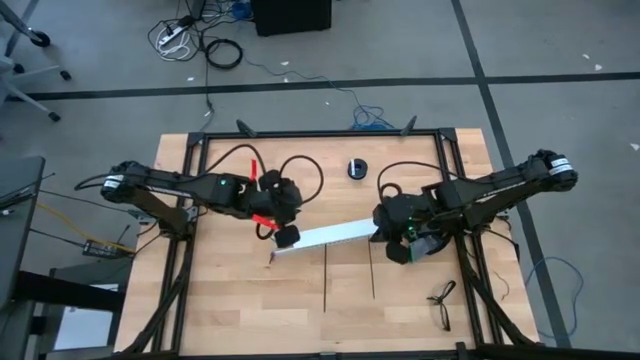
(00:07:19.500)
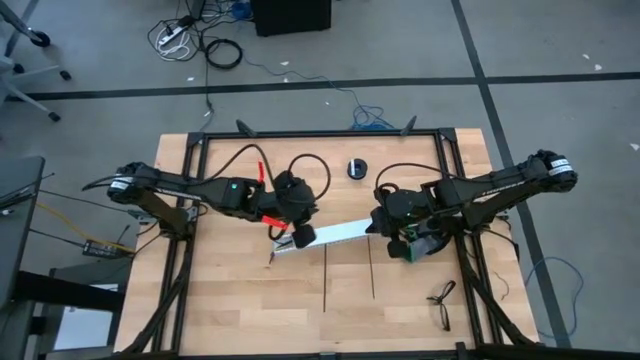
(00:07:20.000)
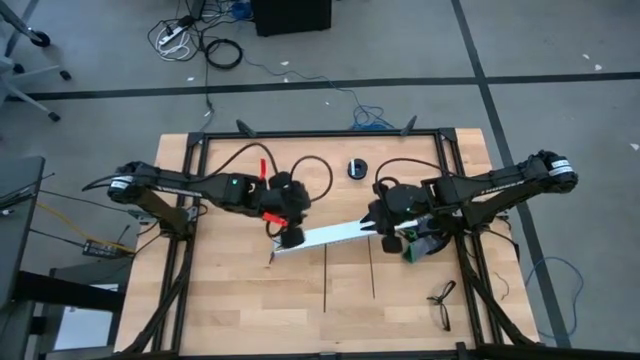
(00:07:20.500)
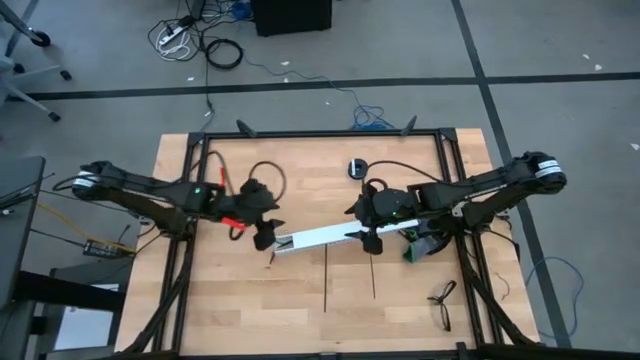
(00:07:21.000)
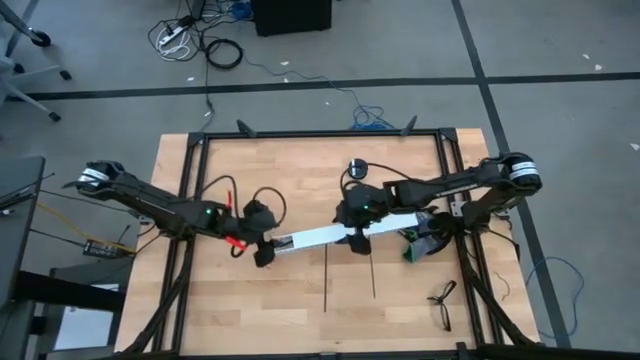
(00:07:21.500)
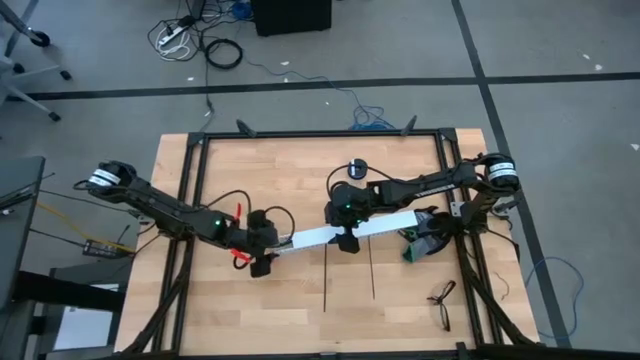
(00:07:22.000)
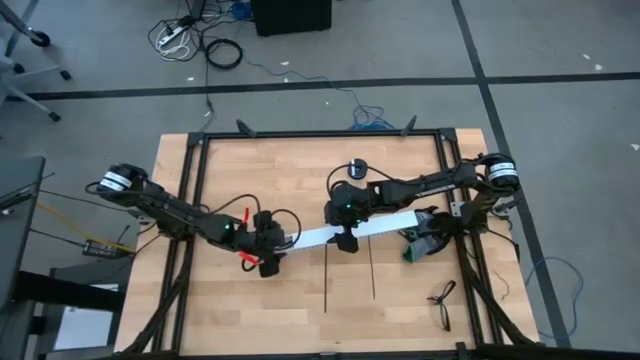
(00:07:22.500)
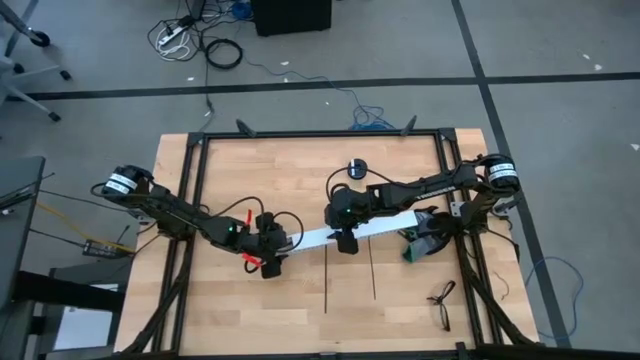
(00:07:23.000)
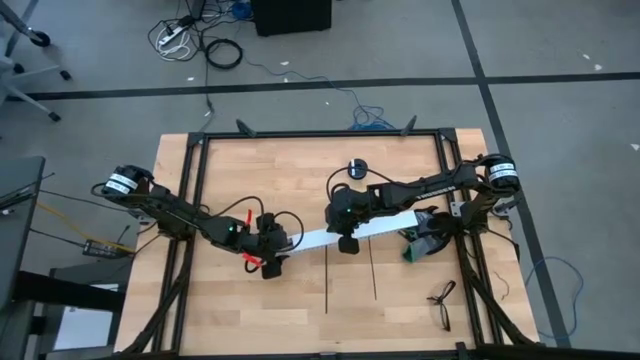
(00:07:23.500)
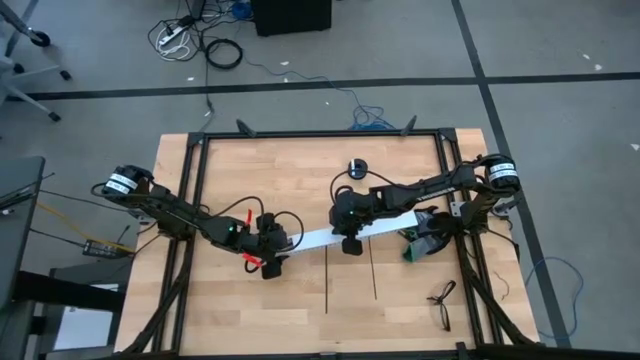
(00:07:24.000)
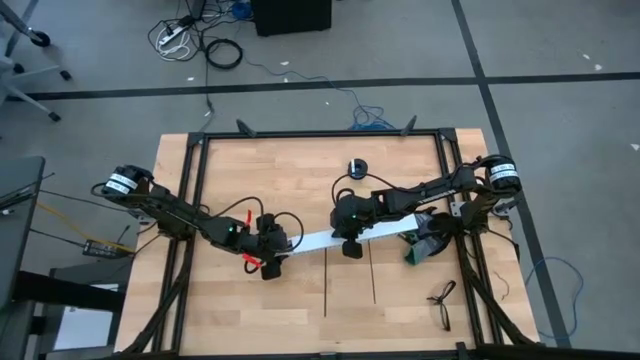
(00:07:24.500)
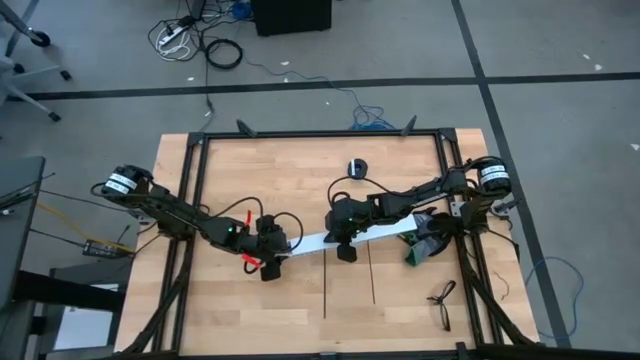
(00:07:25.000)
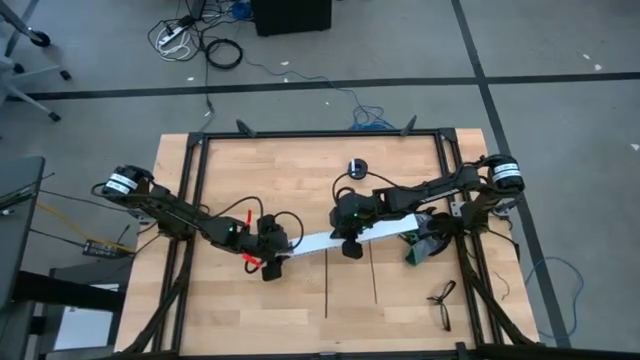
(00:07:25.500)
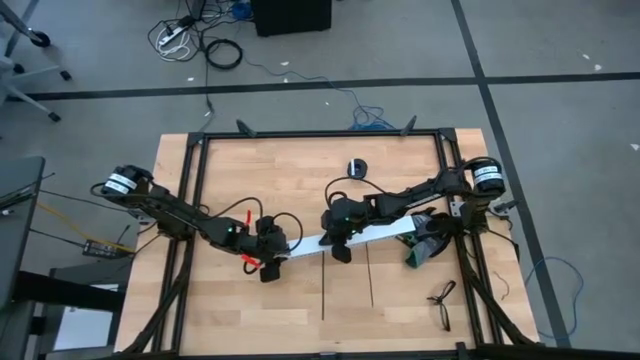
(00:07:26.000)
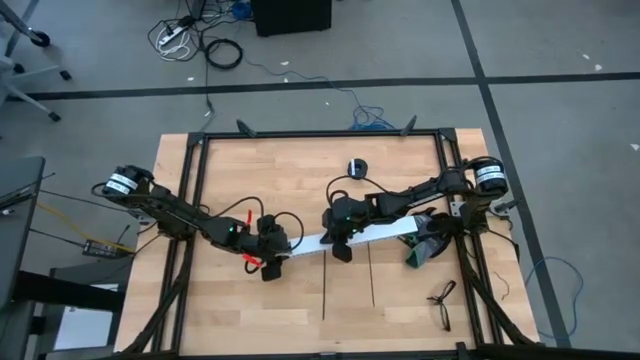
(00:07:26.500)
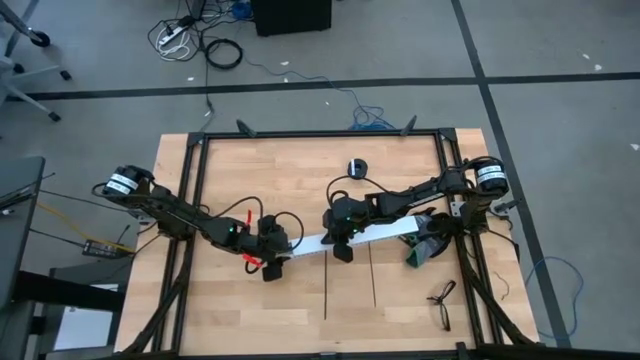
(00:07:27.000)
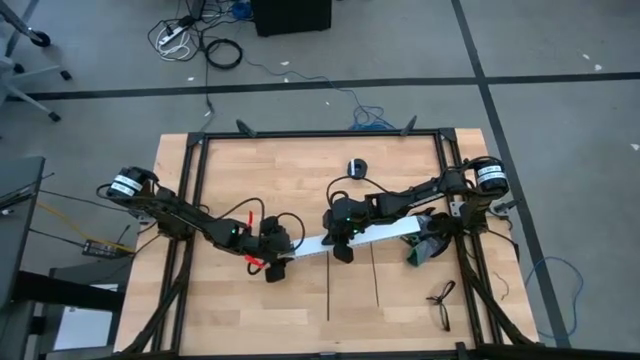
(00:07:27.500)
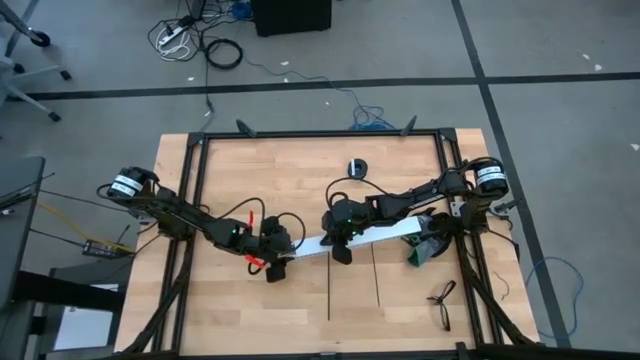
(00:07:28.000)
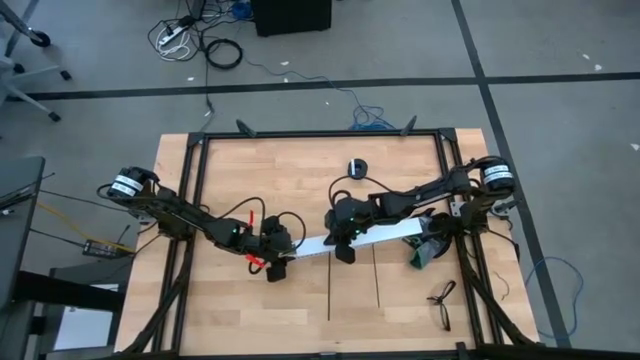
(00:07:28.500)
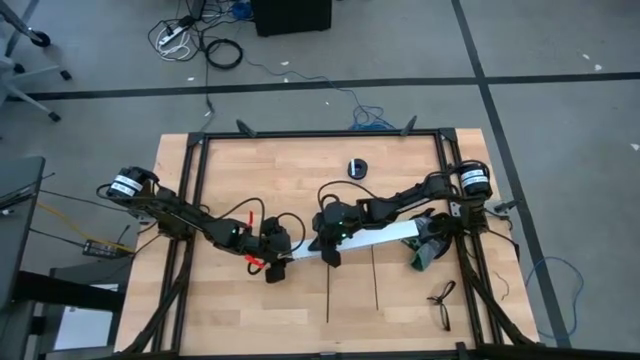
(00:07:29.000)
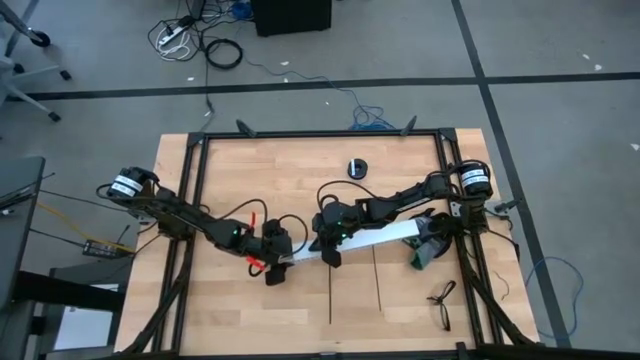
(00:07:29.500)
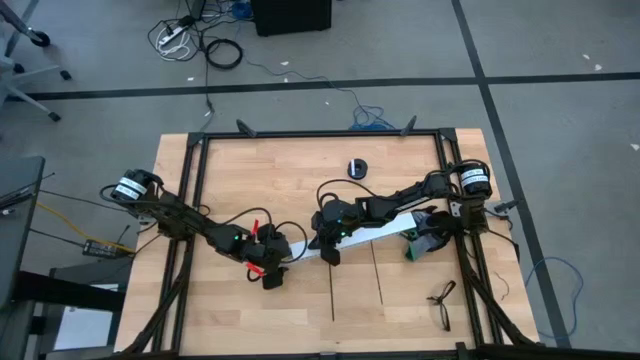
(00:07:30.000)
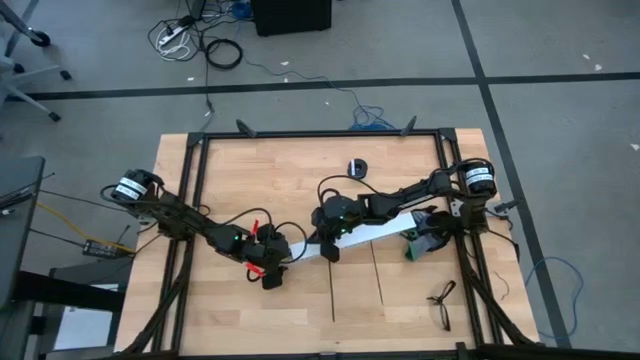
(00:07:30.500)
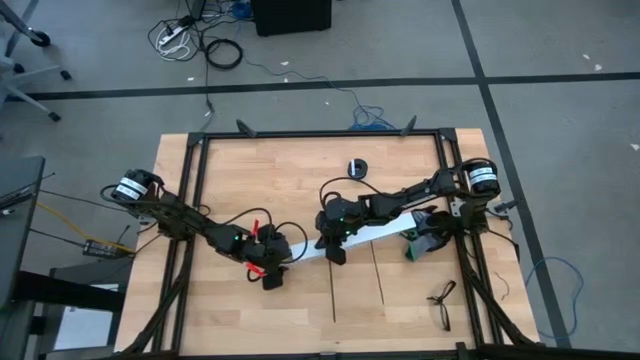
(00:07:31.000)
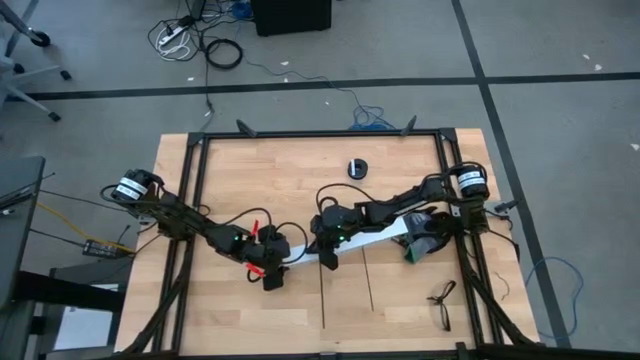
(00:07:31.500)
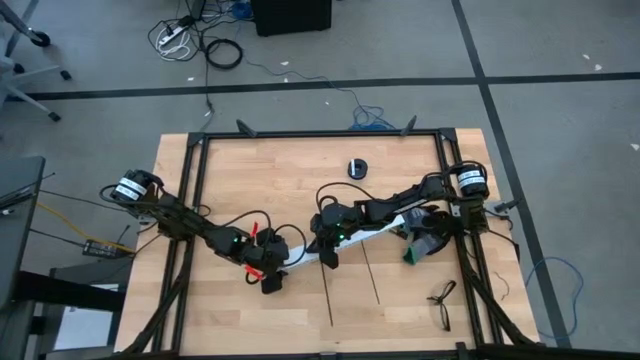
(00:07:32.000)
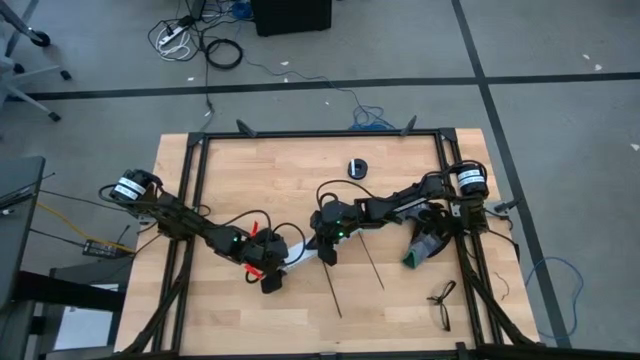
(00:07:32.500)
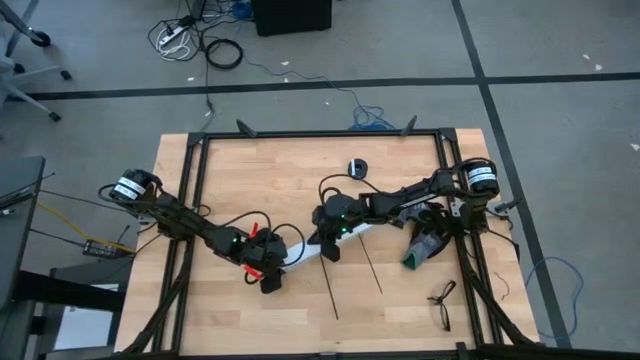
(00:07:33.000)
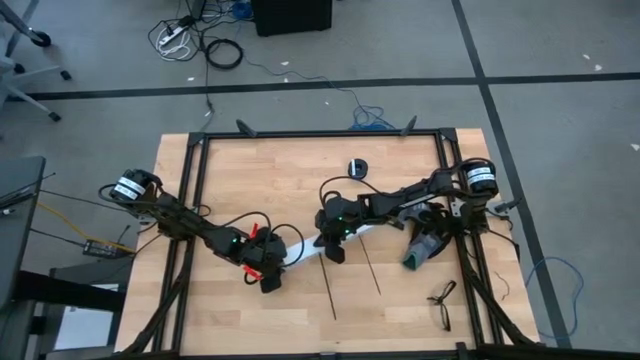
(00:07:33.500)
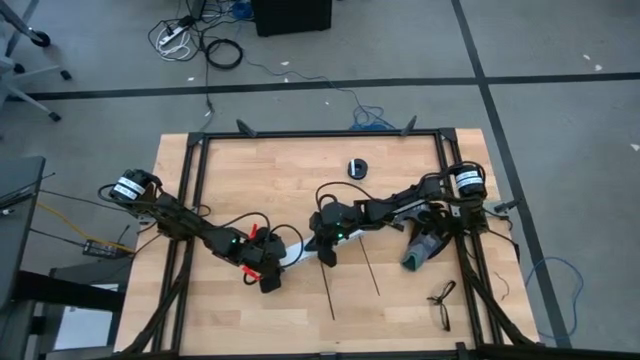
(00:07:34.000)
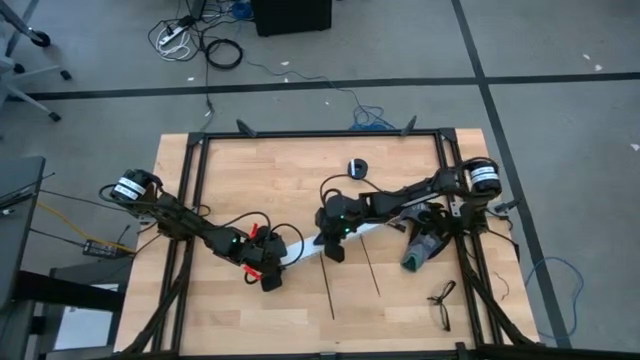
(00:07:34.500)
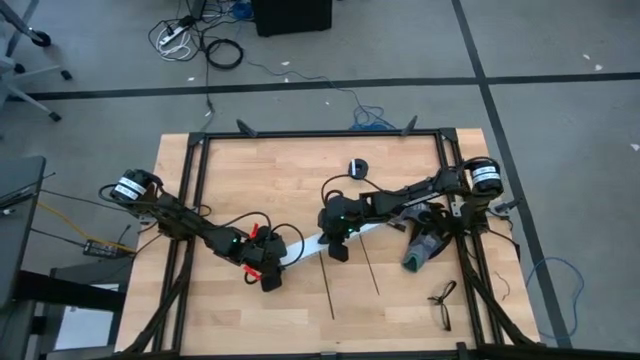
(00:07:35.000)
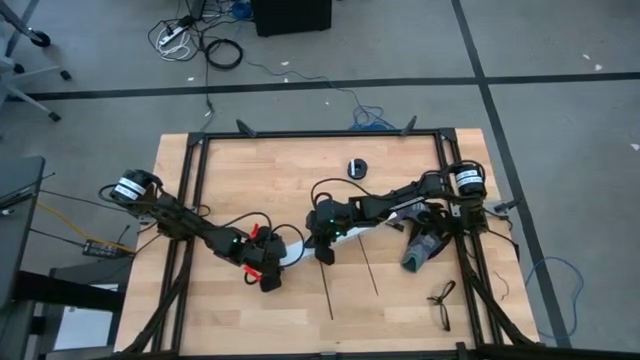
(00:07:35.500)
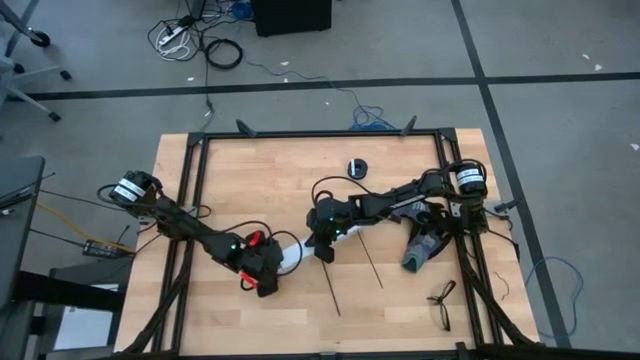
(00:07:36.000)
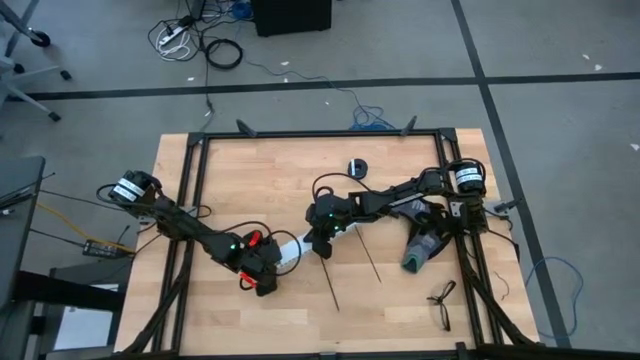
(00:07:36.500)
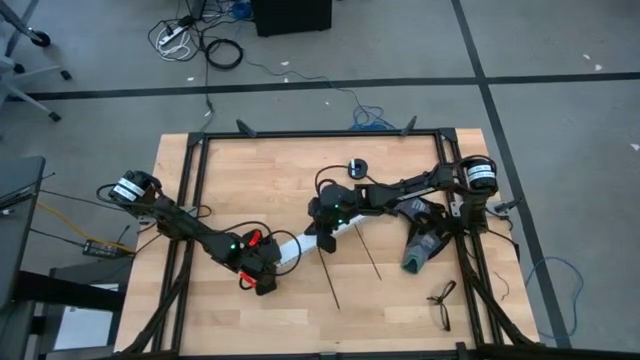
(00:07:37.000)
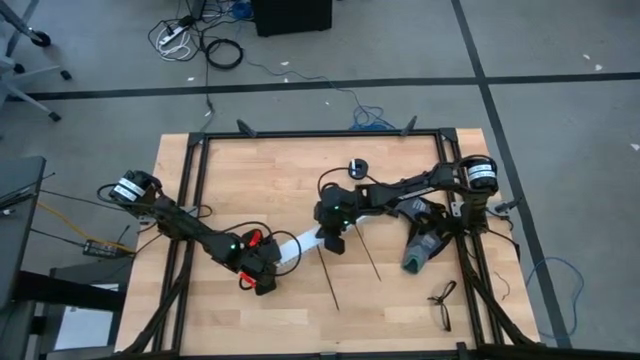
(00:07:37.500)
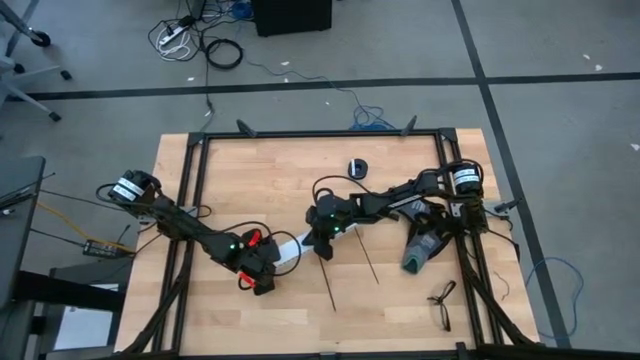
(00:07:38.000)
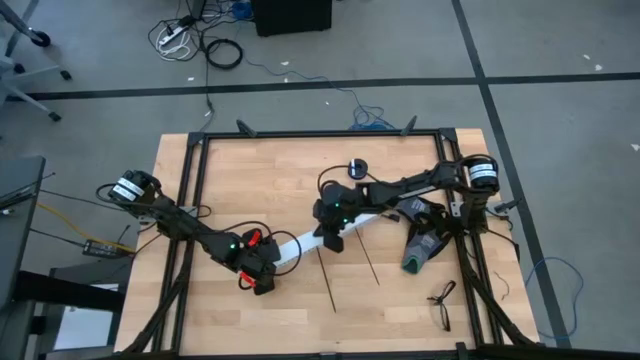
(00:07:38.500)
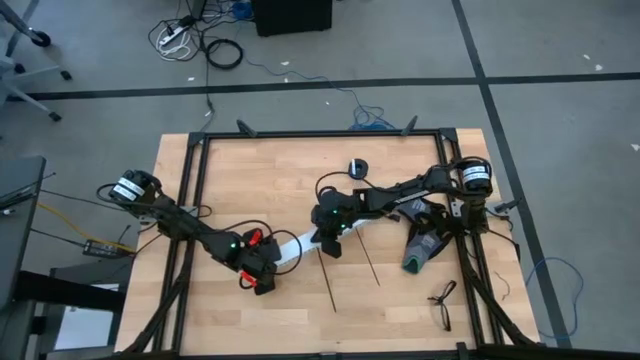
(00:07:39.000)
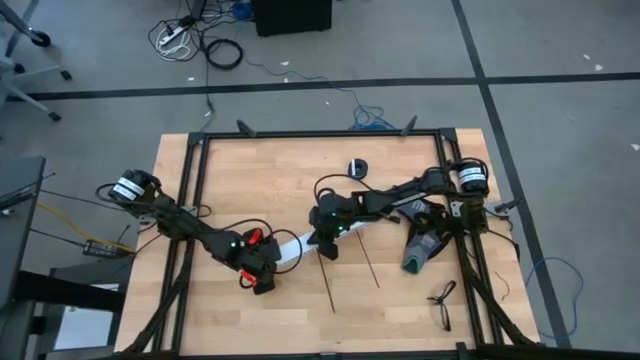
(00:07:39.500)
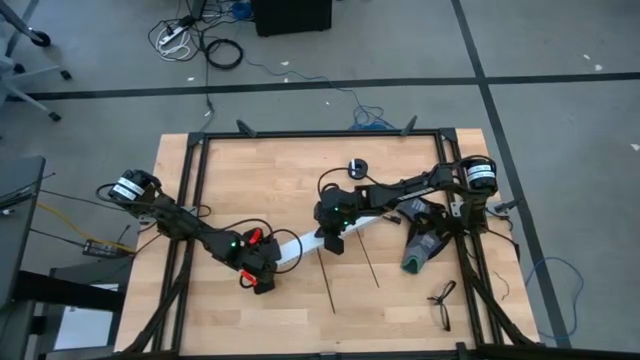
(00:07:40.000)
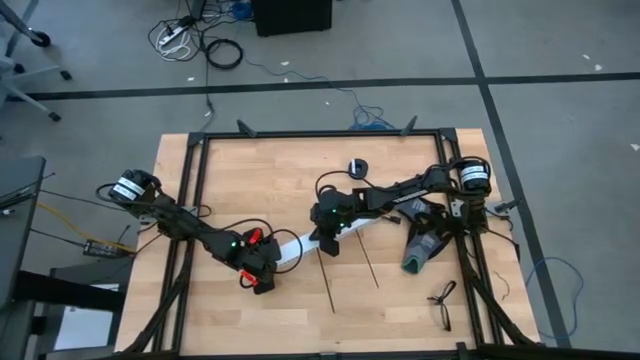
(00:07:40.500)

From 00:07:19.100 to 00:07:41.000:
Task: Ziptie cables
Close the white cable duct
